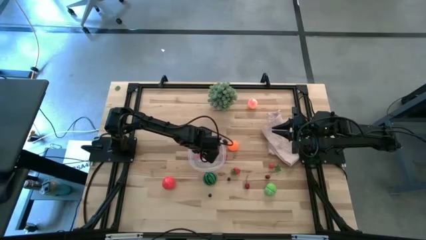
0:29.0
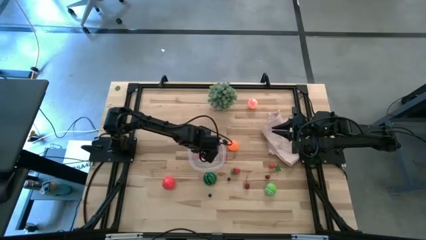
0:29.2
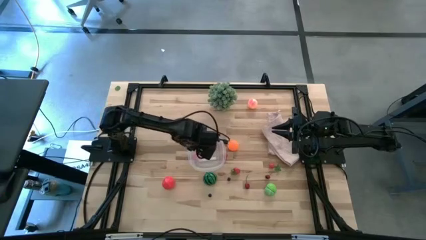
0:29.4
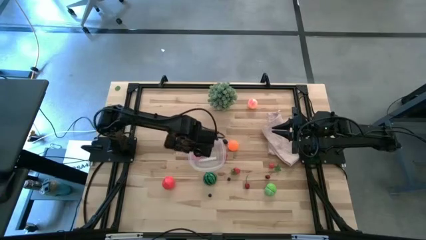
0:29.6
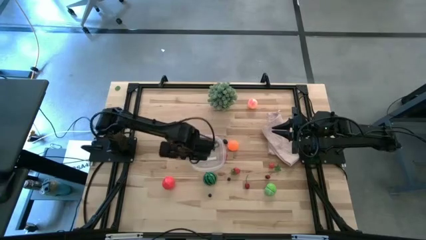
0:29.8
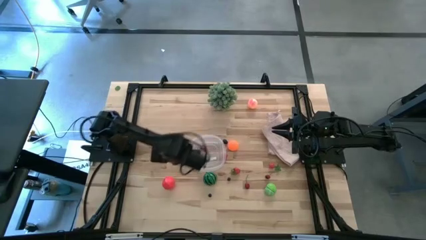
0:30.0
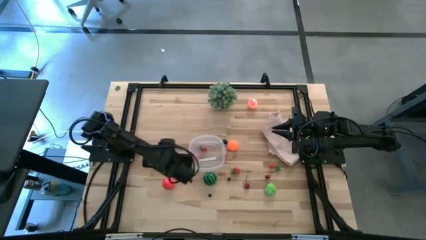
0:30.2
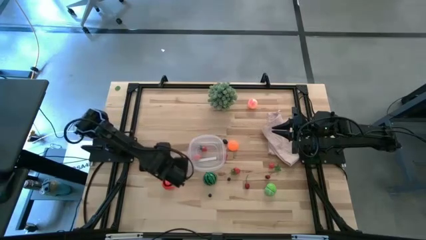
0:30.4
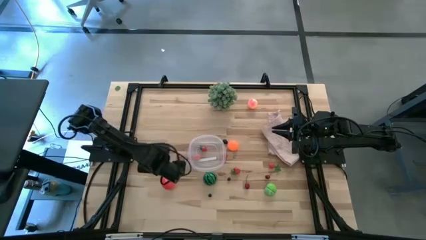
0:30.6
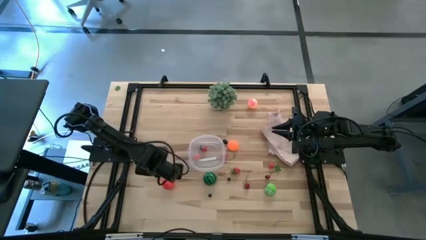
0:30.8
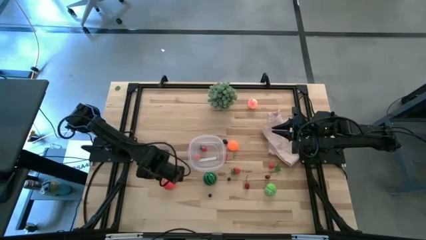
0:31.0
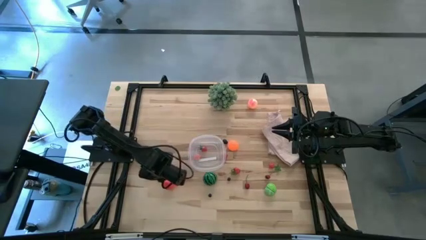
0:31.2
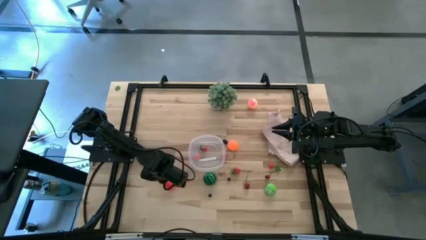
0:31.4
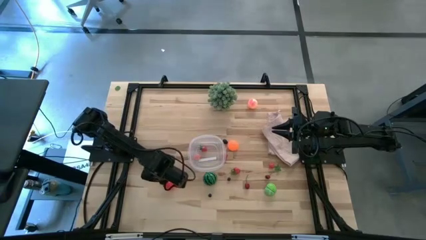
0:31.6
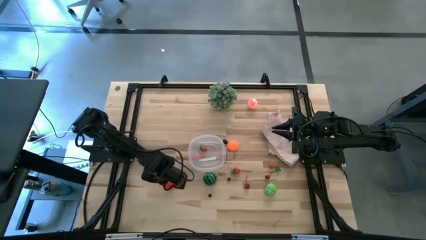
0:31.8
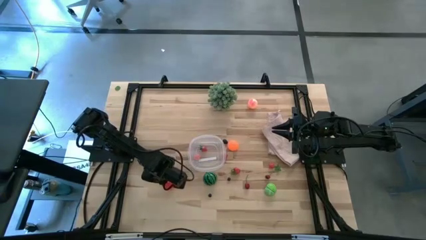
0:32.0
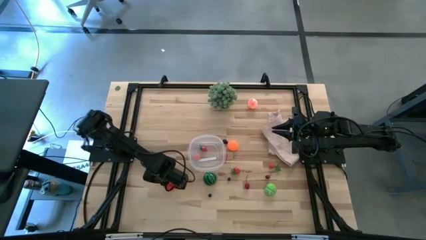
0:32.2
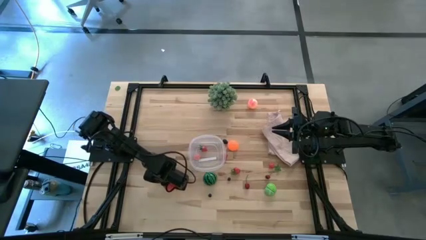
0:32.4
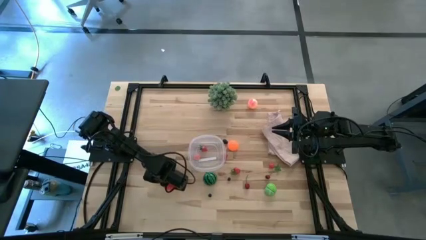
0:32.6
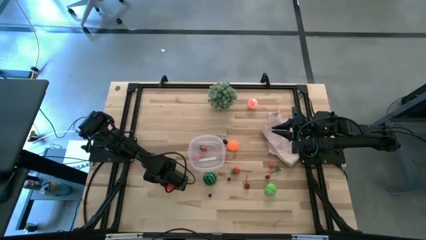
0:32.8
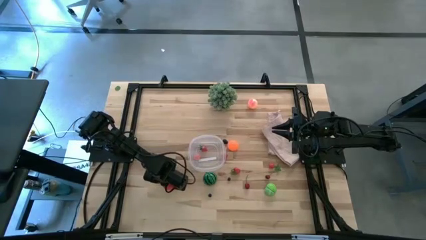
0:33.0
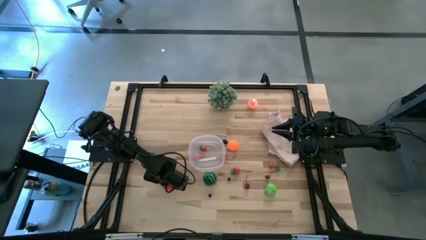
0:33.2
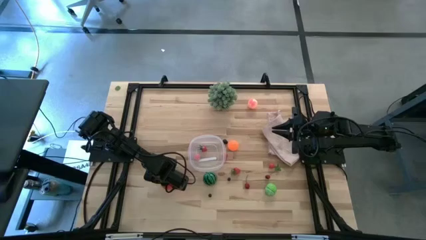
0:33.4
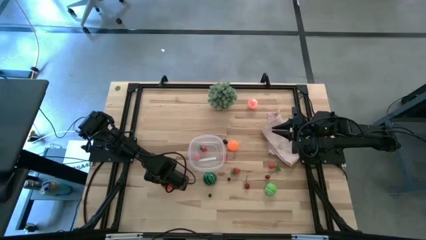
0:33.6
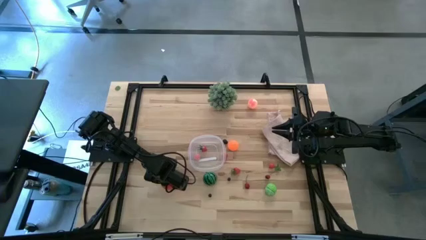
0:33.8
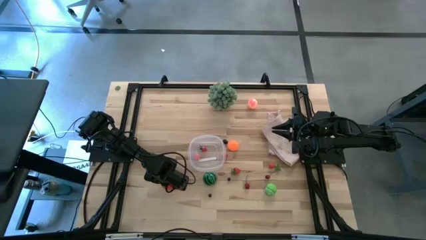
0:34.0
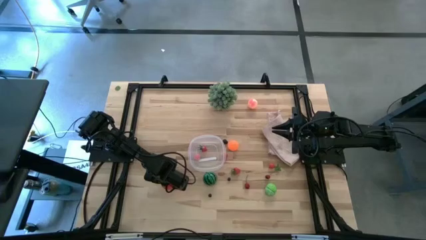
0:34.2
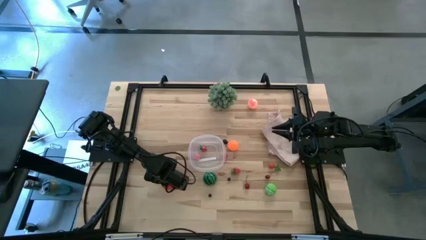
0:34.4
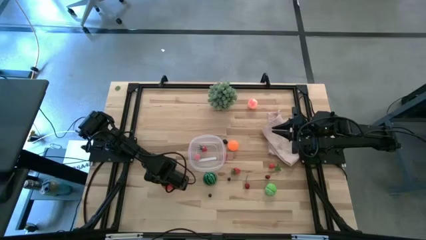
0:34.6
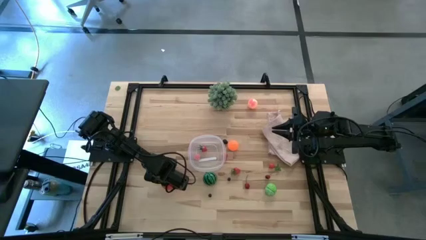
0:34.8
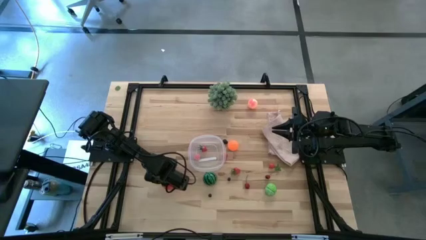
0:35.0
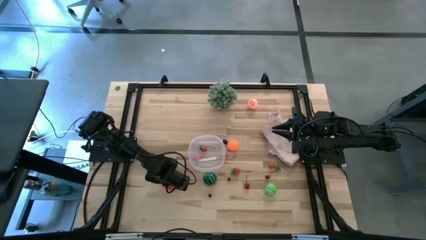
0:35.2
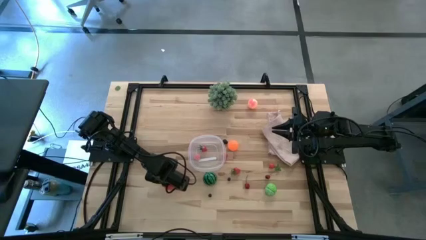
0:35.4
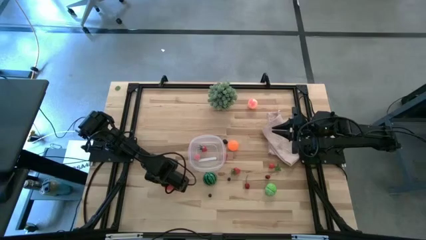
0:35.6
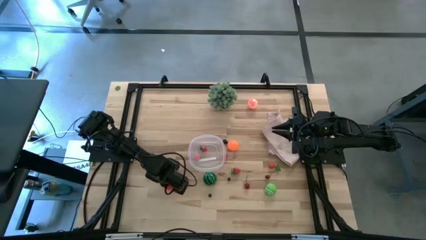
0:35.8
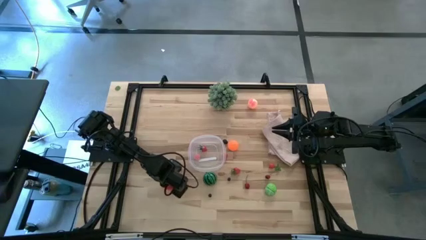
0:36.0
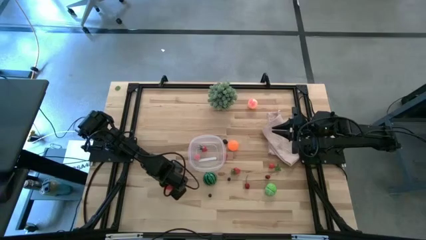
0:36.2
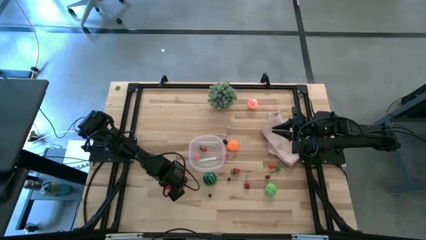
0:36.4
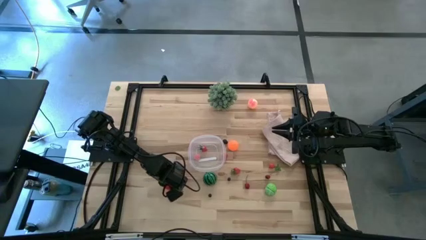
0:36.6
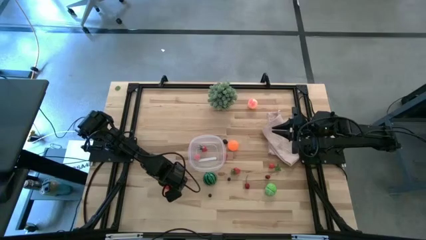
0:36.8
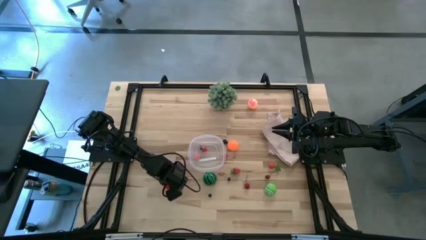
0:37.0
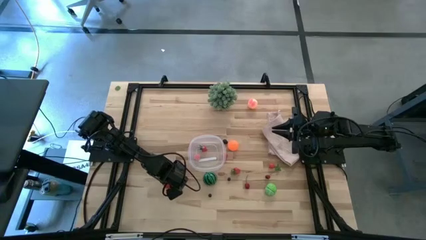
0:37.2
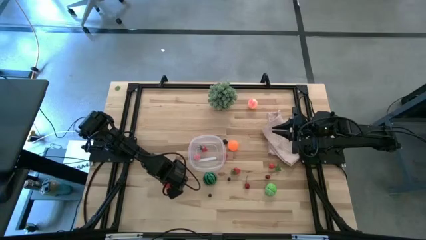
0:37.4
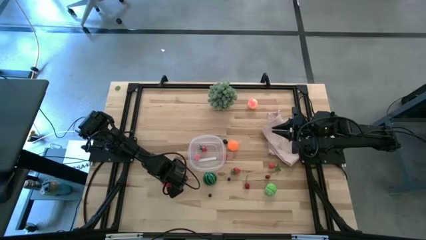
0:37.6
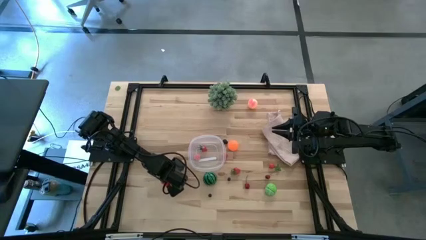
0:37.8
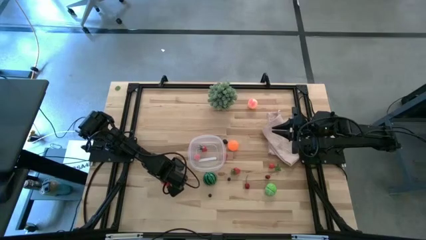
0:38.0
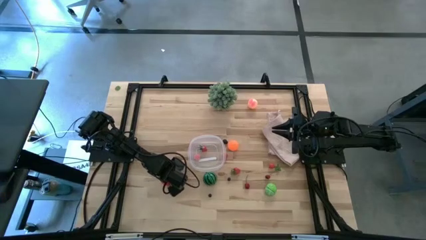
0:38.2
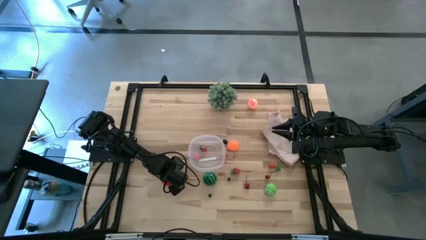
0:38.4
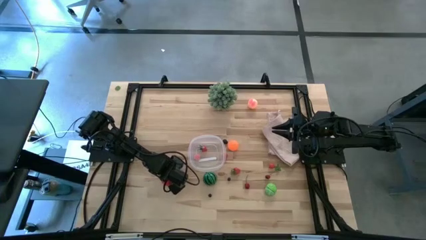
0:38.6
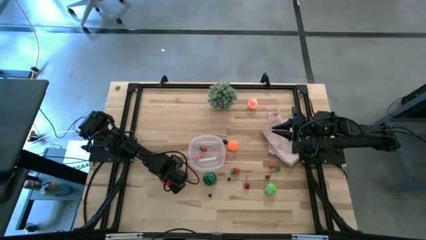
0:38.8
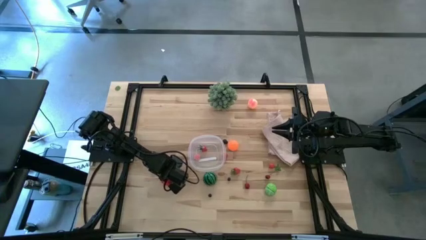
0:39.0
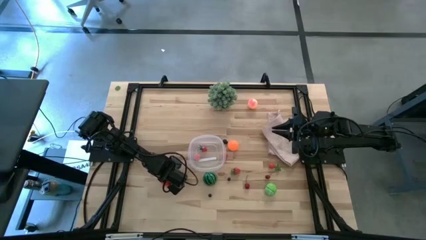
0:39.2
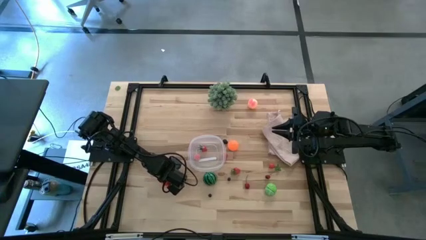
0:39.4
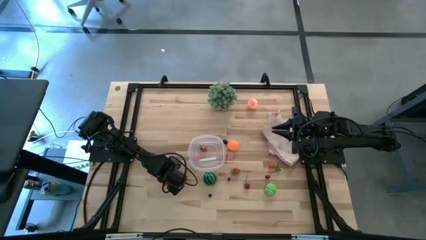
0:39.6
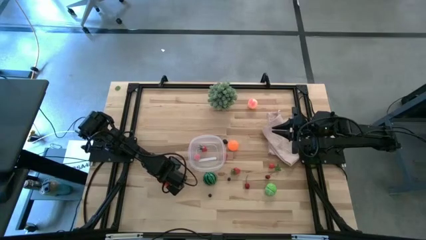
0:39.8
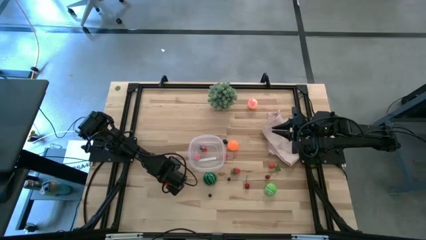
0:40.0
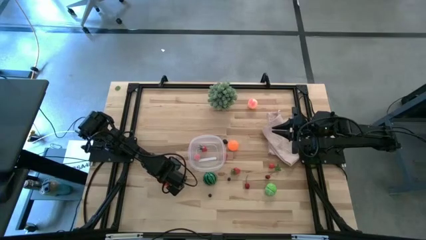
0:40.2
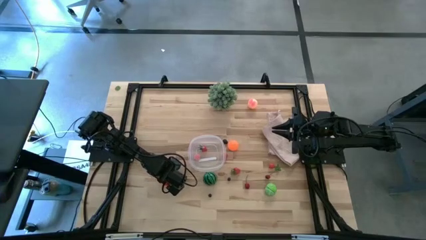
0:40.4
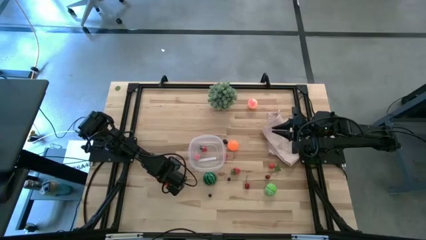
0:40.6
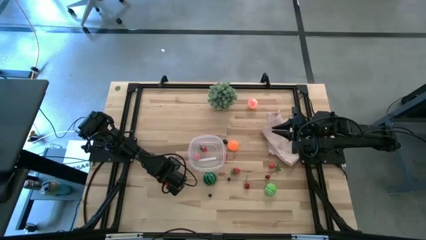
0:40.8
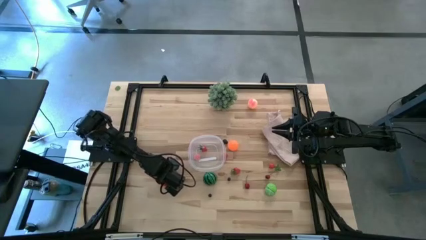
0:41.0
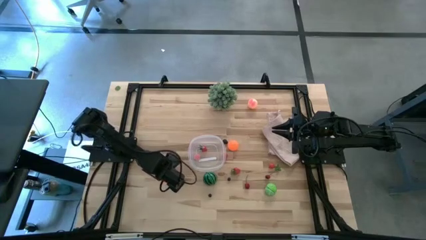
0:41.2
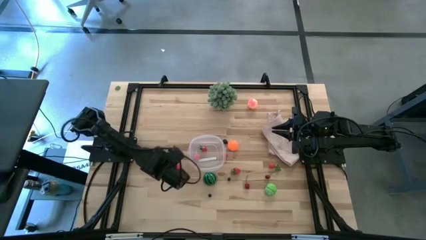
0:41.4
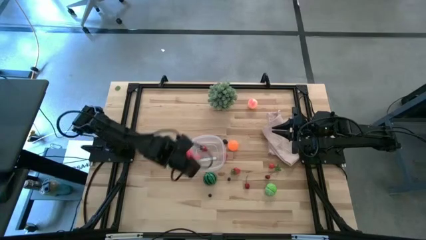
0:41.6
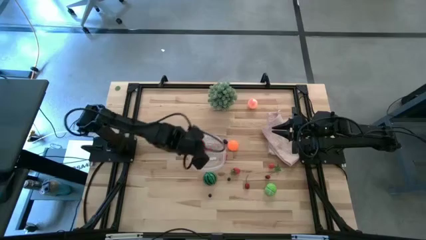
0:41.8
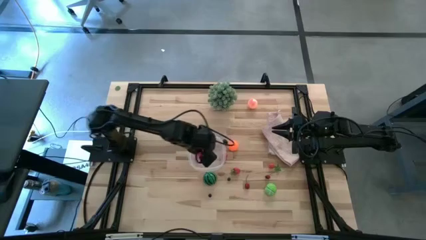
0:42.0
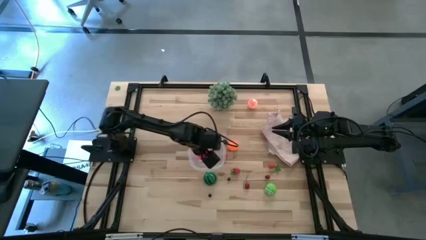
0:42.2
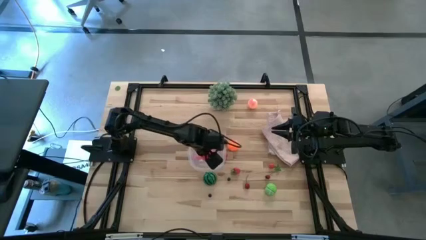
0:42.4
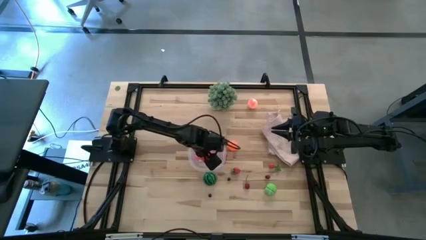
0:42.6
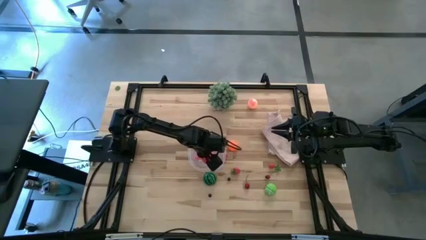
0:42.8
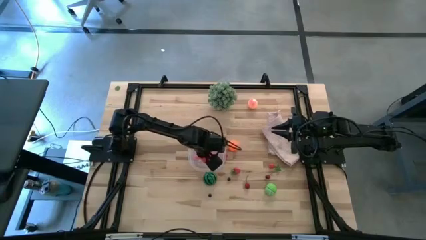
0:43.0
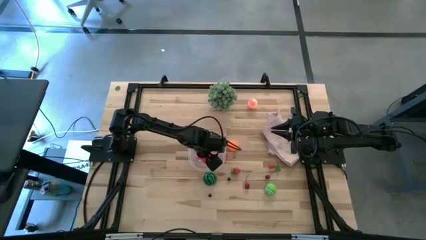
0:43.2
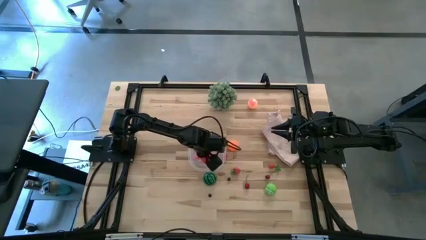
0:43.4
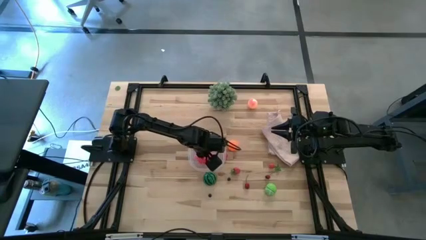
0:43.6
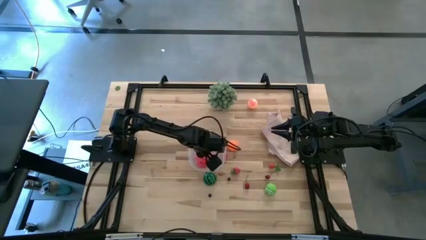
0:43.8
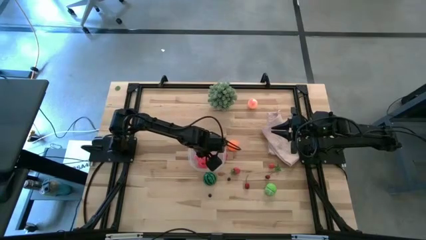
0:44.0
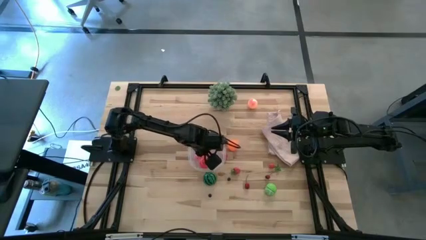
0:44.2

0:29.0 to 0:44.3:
Task: Pick and placing Produce into tupperware
Put the red apple into the transparent bin
